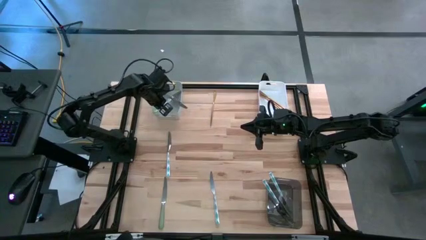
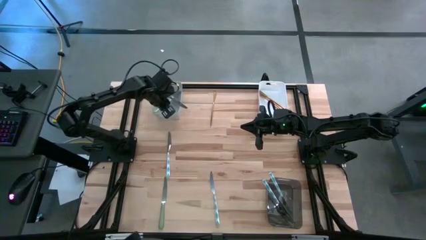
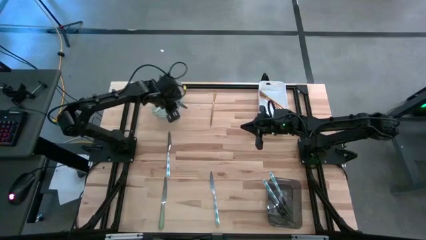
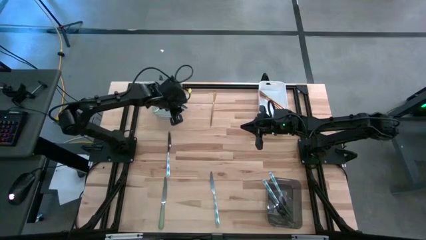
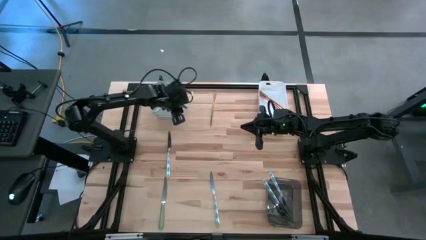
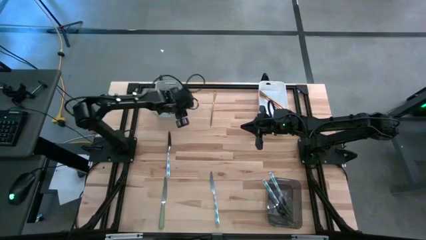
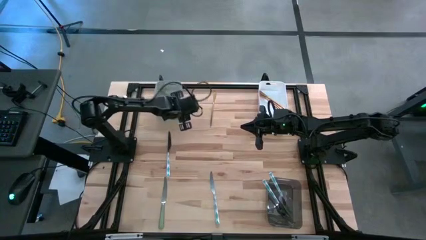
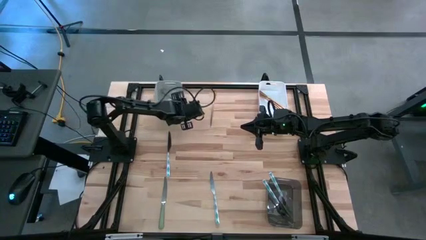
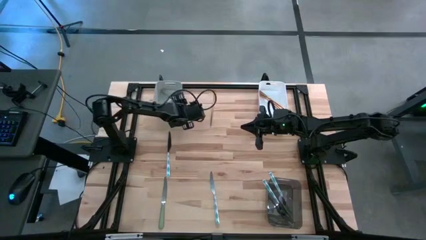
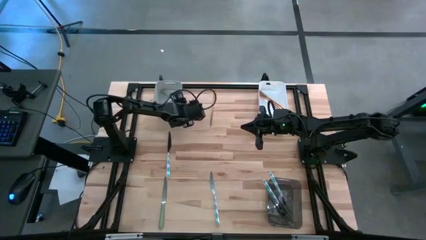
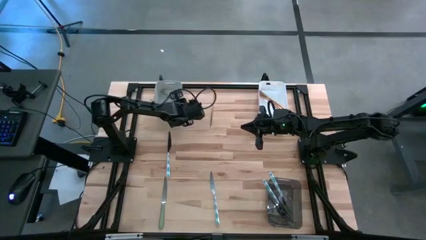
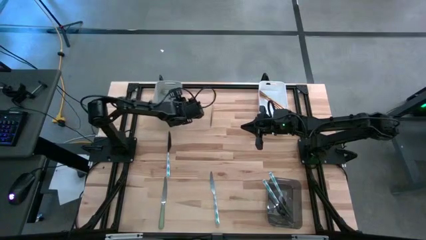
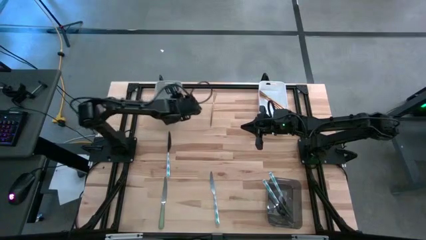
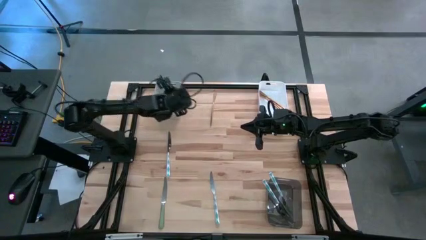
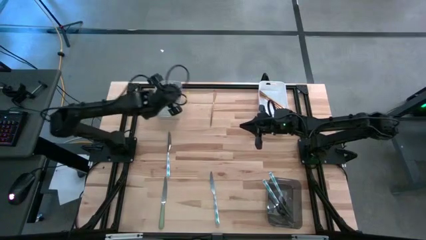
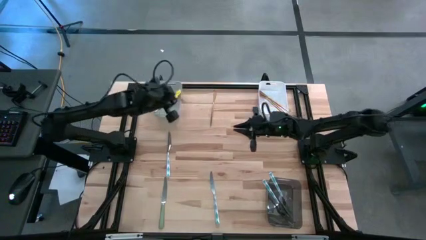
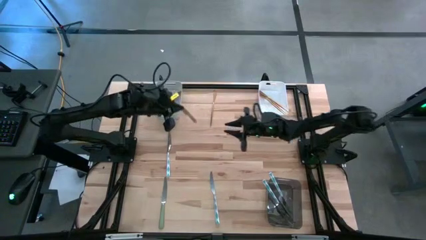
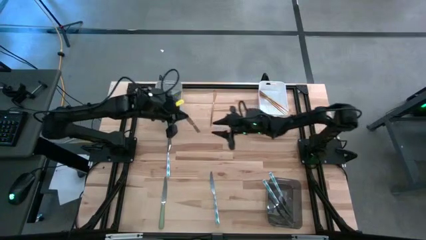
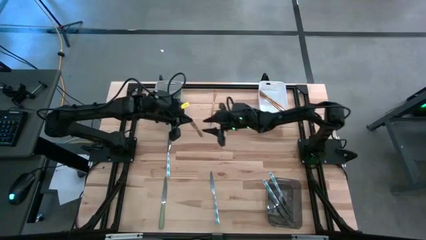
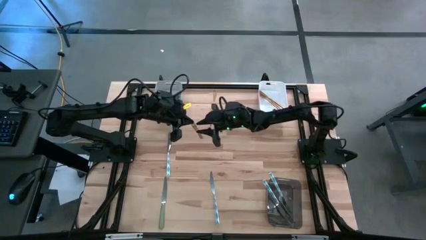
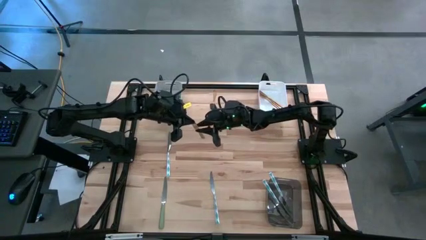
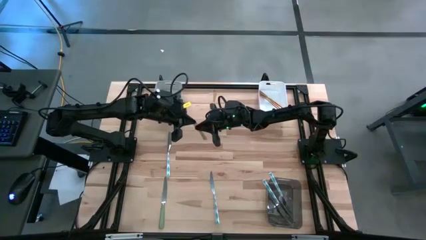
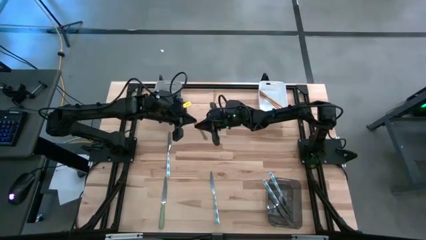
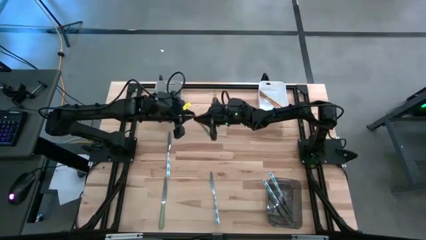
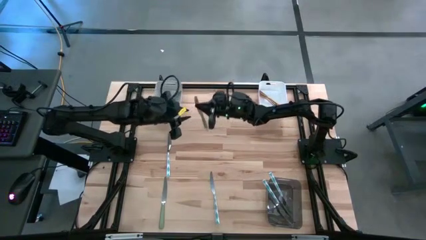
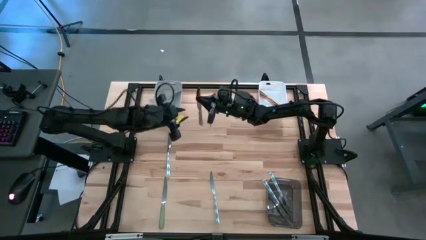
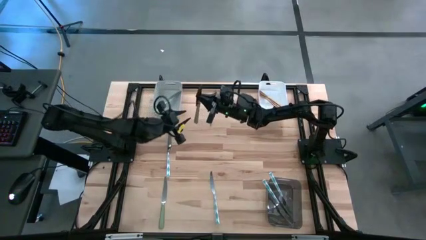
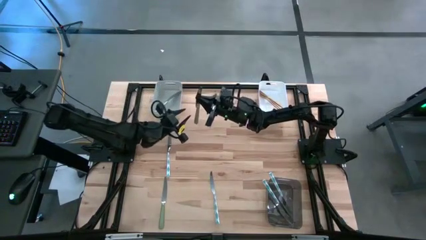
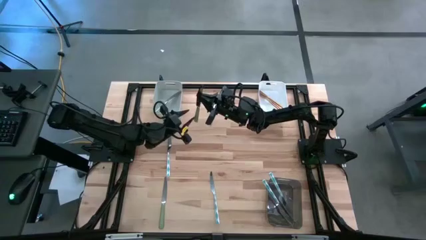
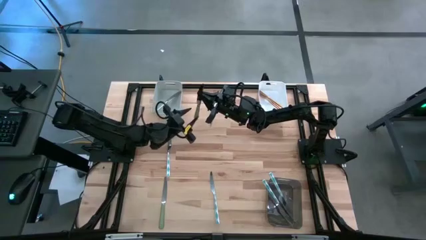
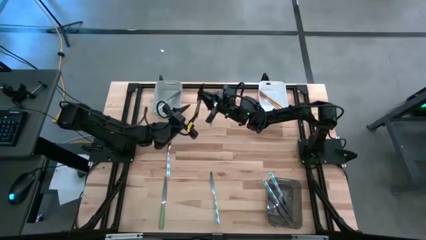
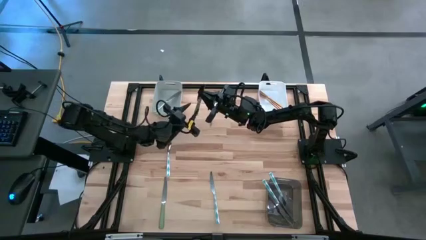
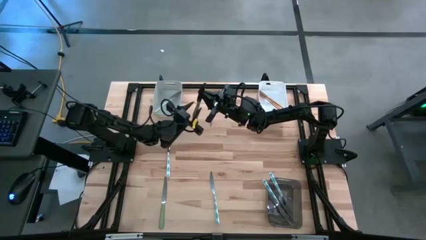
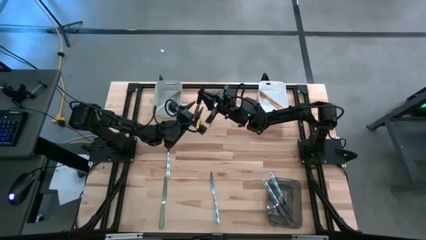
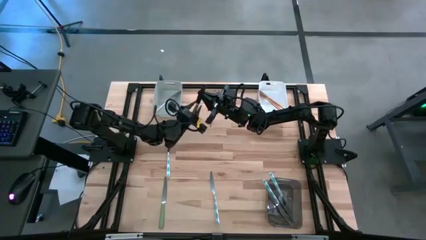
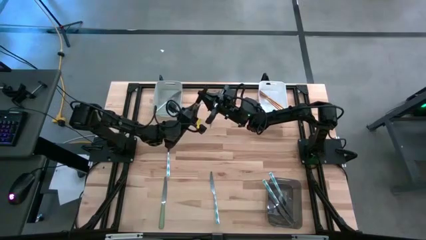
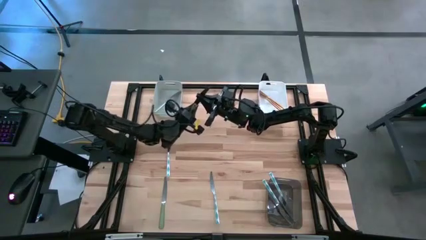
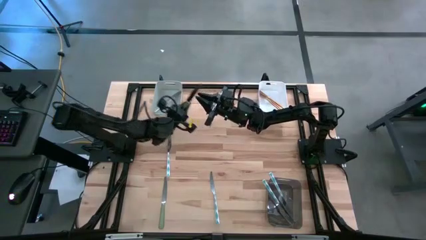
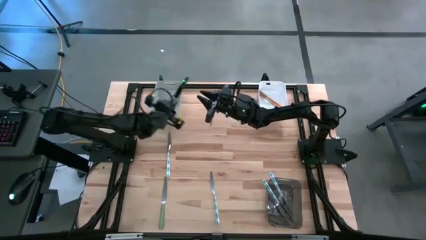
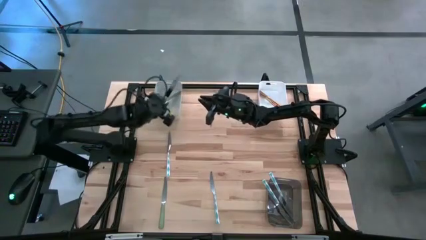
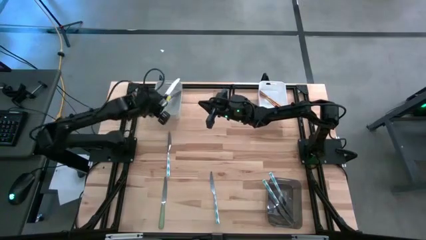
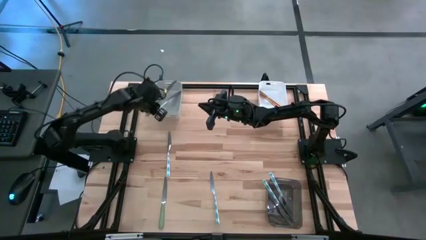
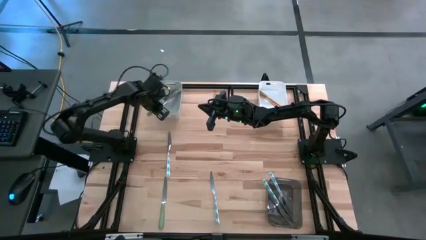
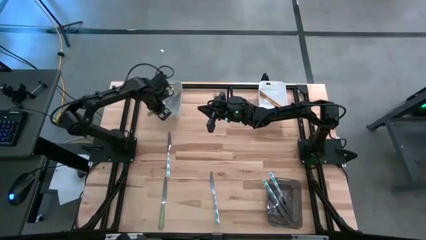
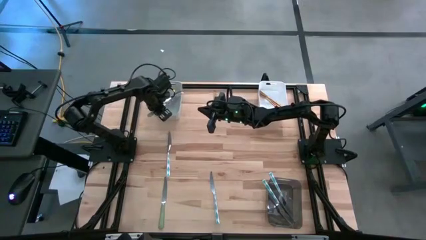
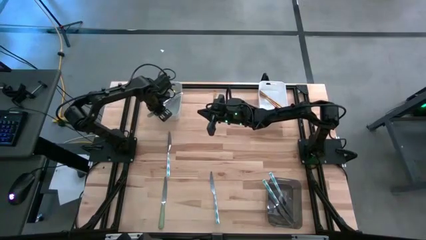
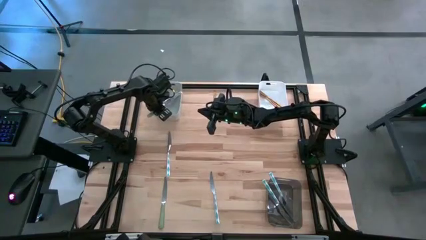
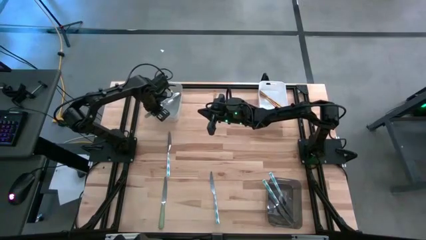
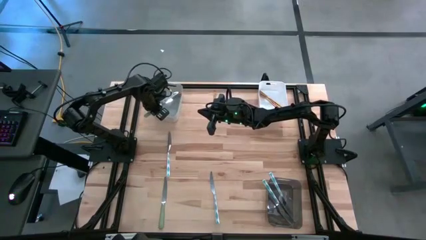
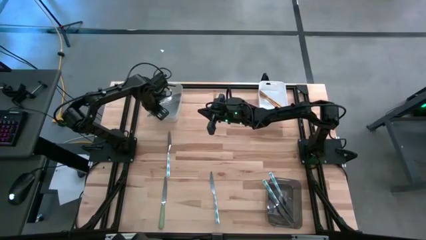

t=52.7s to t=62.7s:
Task: Sort silverware by color (type)
Put the top green knife into the gray bin

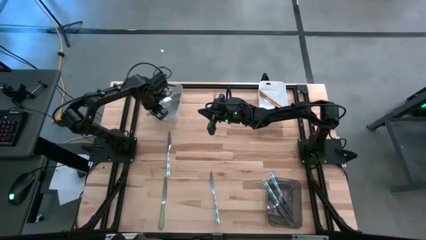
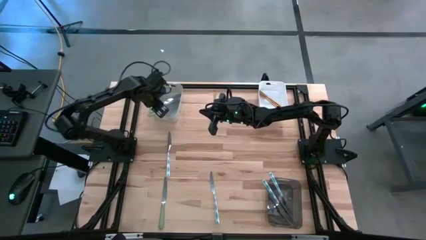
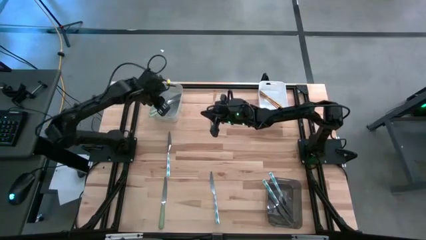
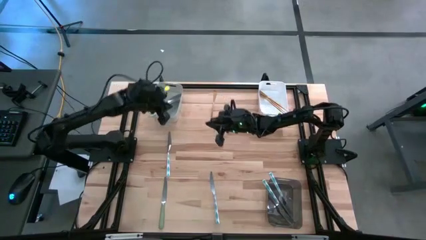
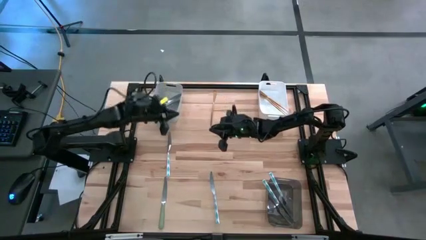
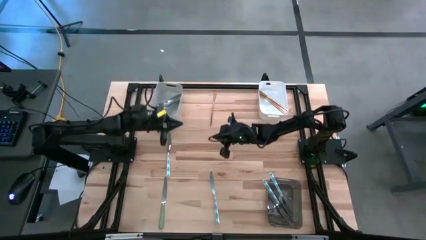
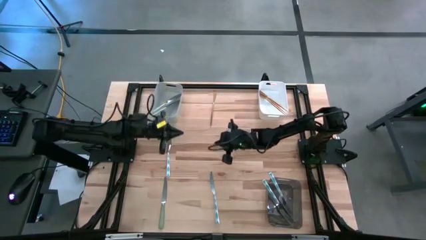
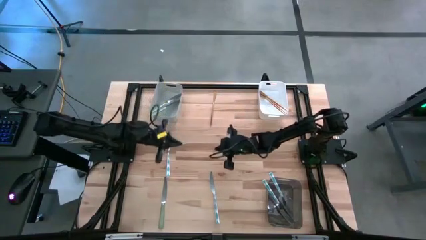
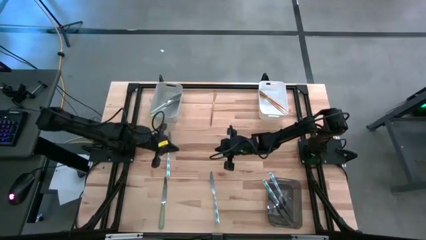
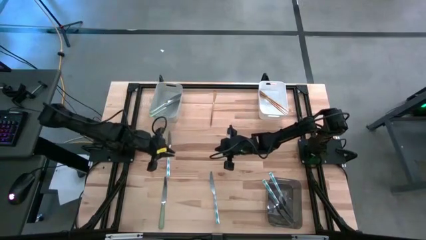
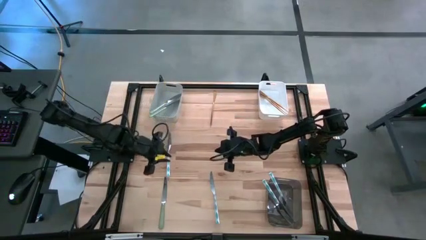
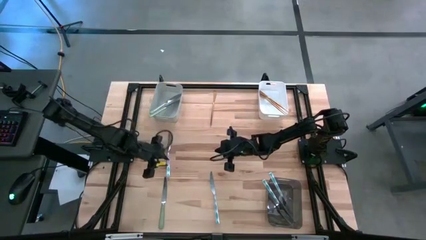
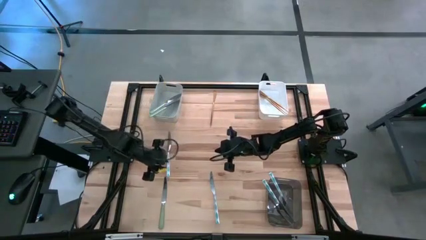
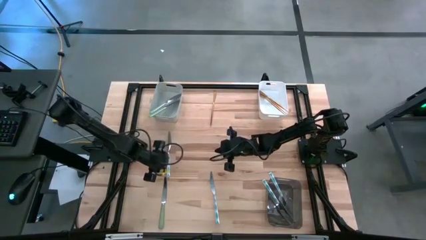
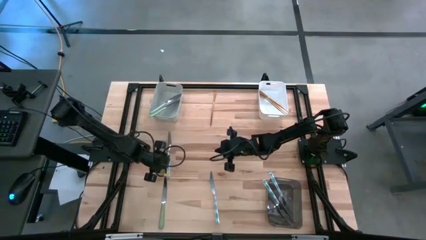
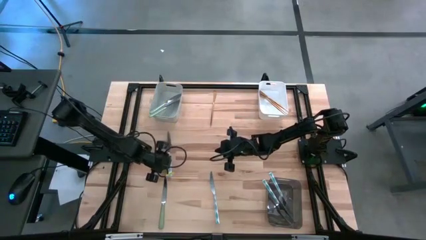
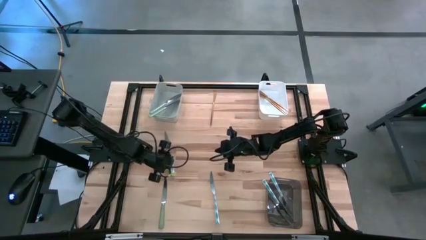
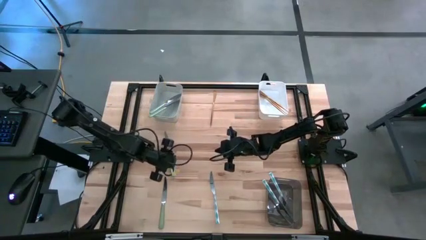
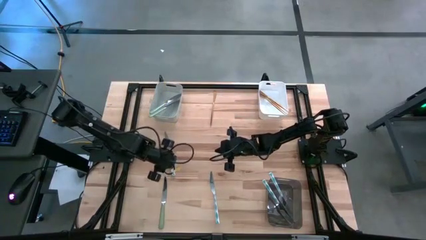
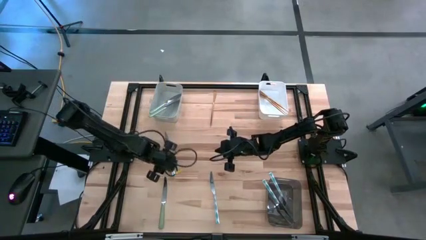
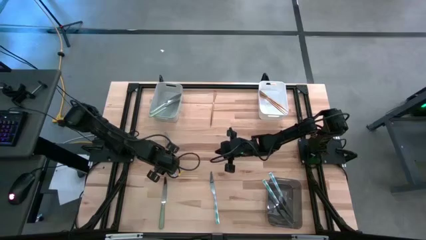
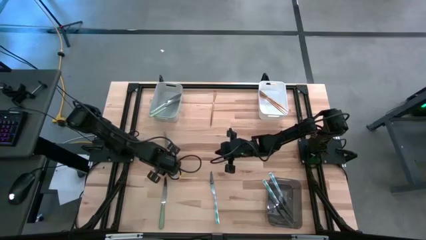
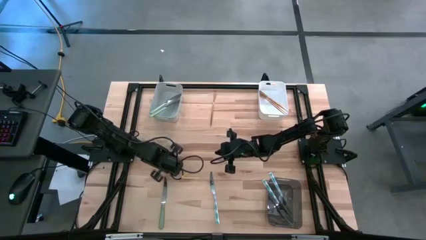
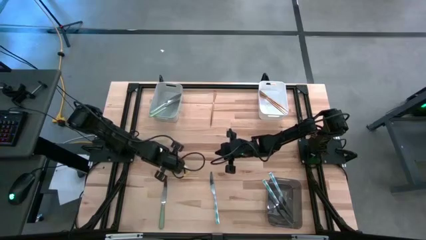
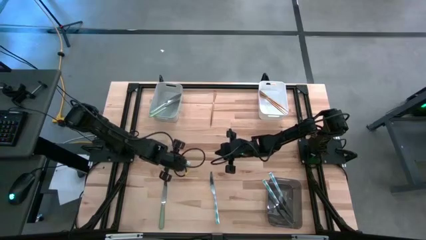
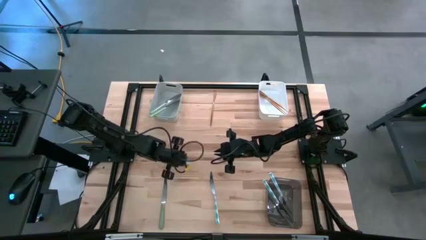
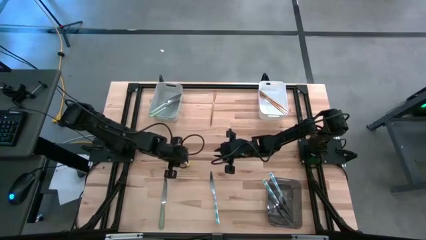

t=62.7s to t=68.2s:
Put the left blue knife into the black bin
